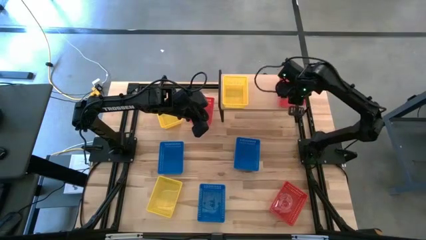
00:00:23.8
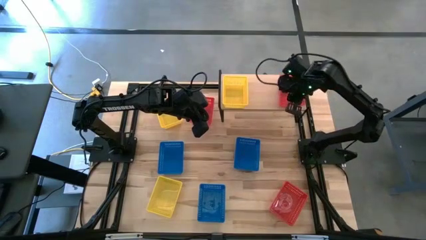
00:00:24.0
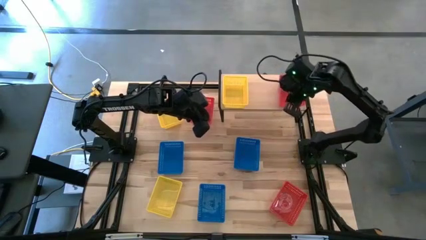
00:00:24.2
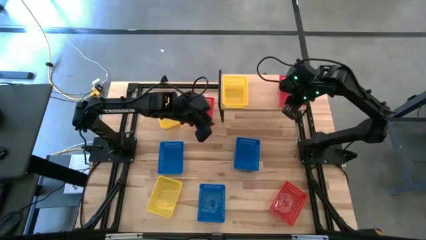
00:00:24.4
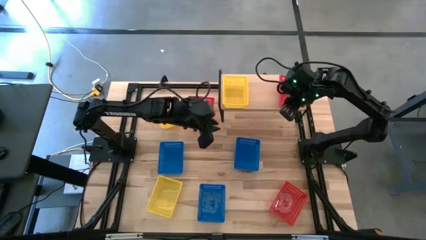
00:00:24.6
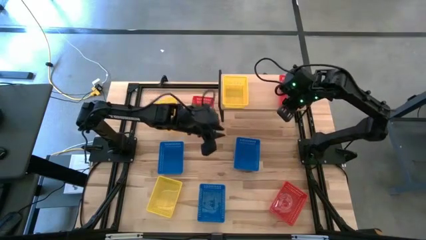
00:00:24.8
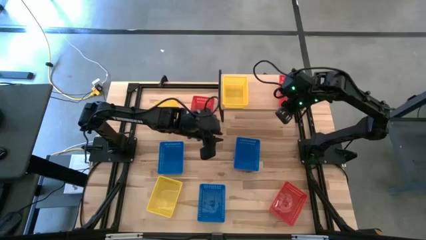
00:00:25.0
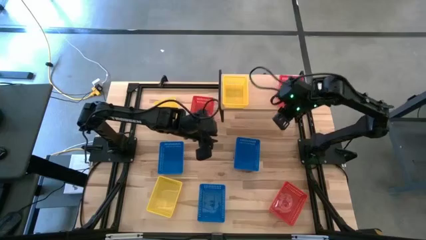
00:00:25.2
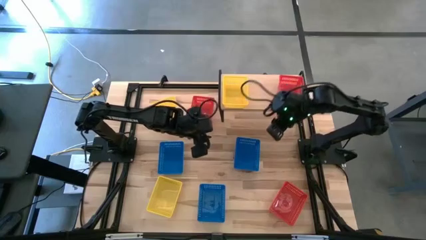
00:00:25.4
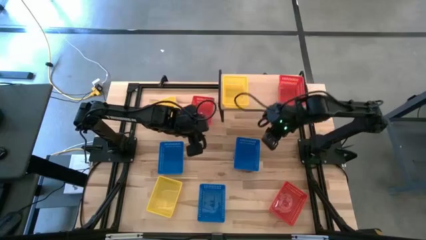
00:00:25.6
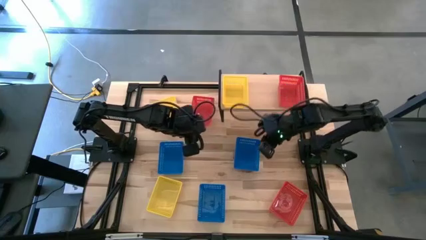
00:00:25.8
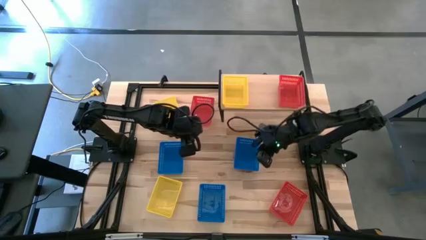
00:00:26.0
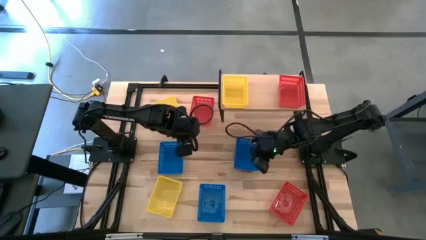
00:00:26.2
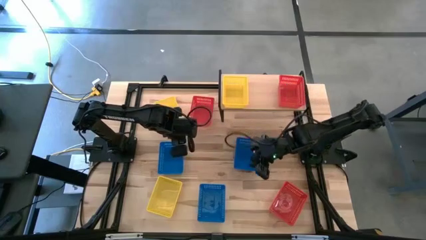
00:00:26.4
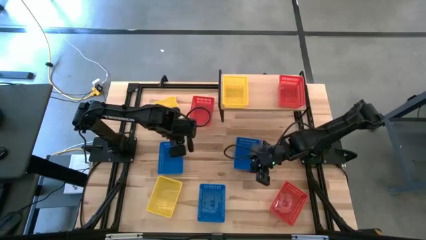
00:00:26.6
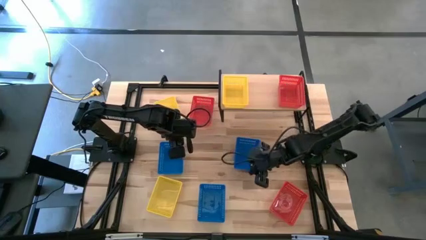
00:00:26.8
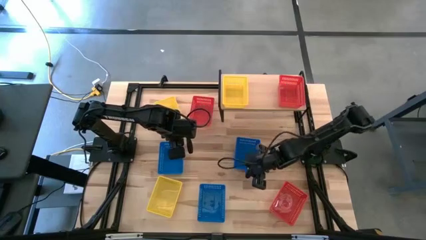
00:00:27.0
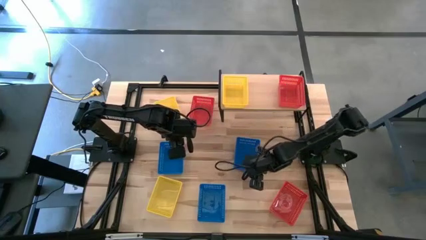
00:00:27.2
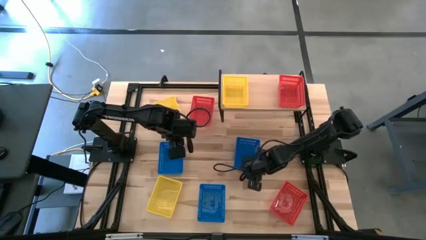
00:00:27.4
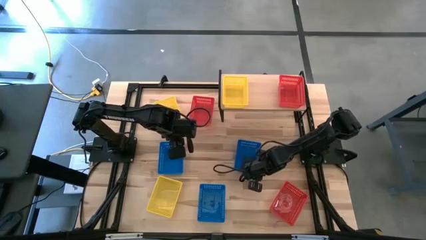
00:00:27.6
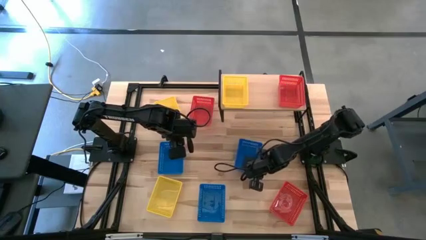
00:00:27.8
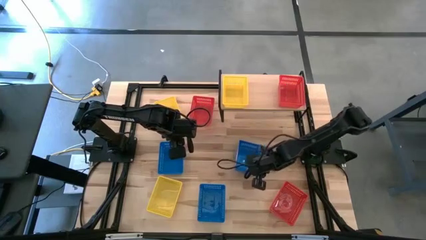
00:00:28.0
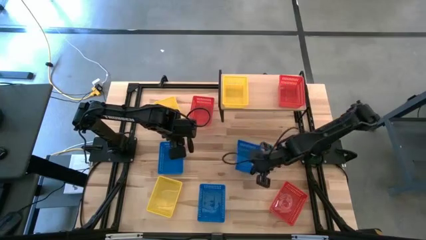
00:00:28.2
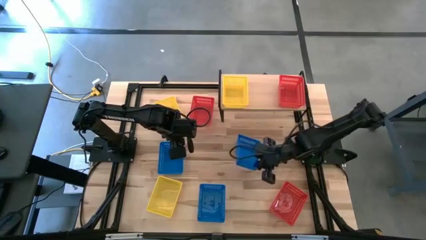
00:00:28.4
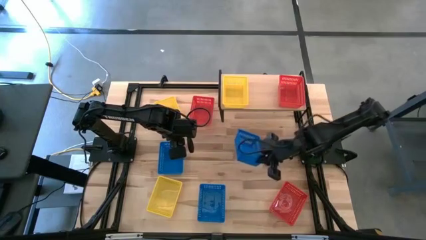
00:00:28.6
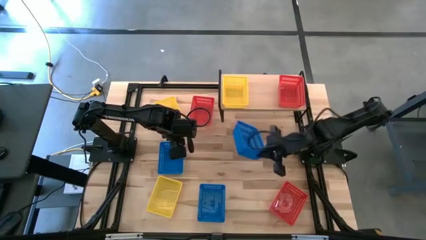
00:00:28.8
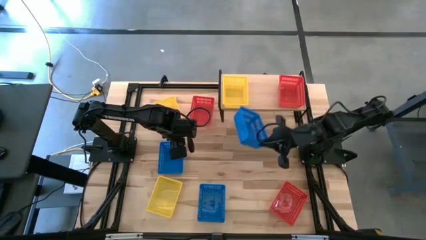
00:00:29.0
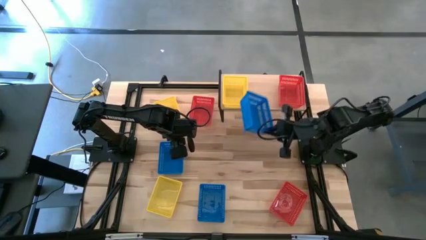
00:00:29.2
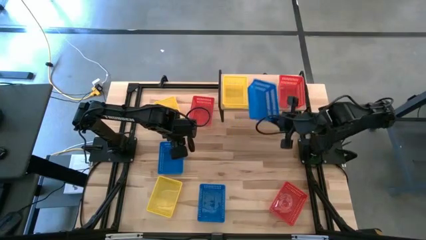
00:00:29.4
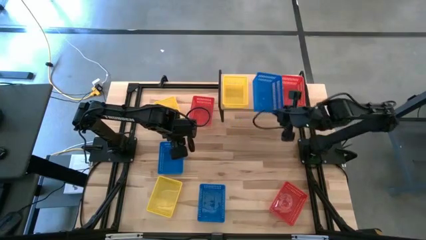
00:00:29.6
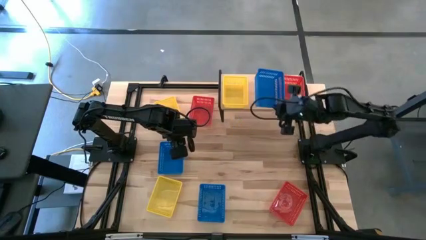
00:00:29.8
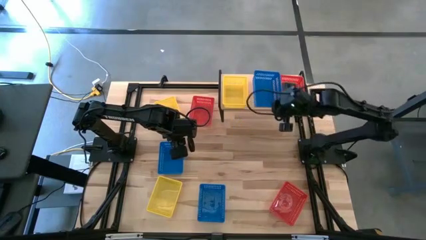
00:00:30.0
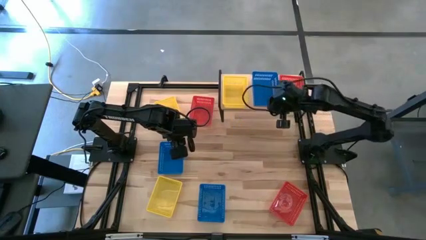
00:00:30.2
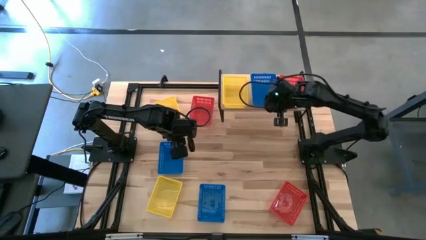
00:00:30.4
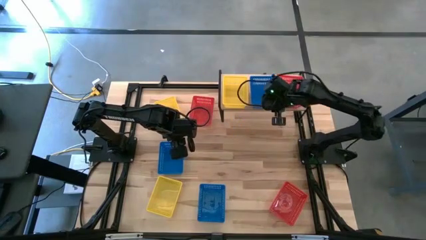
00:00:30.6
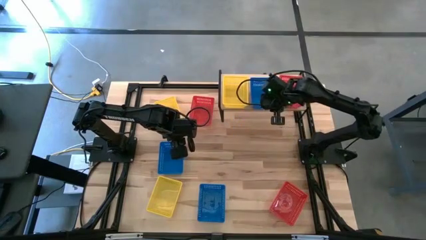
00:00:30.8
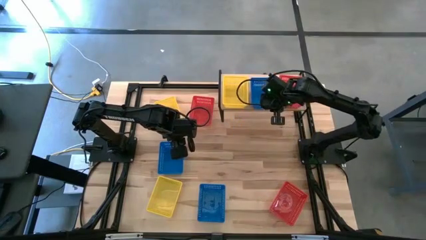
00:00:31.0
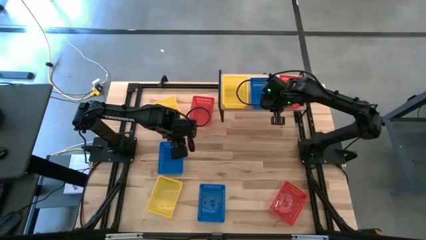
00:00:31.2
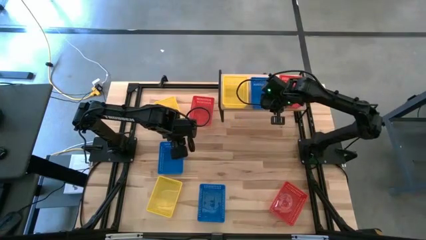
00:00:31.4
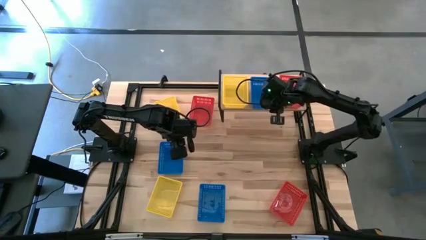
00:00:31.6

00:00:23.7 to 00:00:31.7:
Task: Stack baskets on shelf by color
Put the right blue bin on the shelf

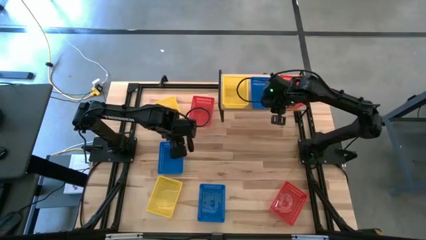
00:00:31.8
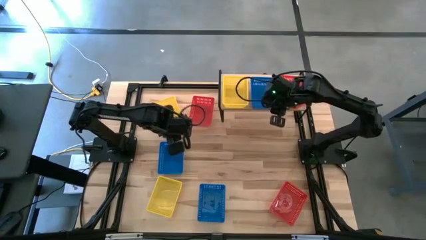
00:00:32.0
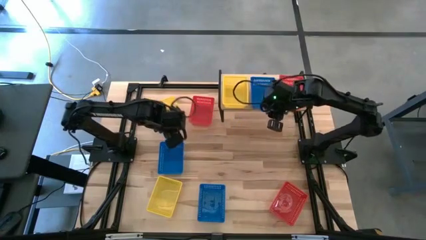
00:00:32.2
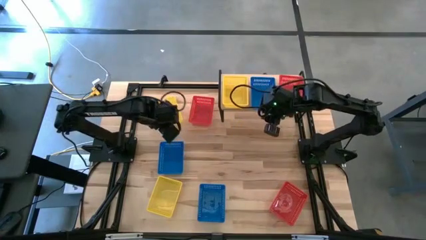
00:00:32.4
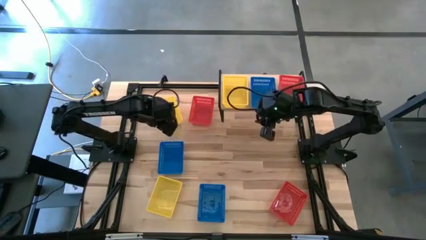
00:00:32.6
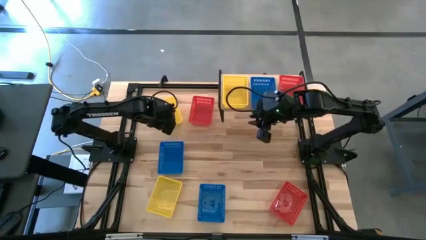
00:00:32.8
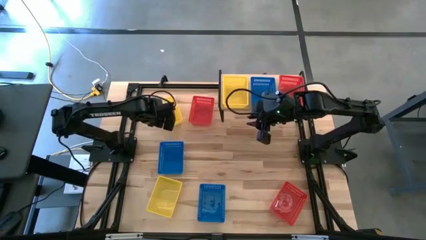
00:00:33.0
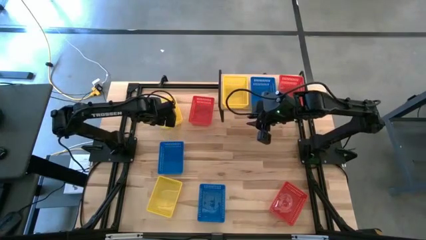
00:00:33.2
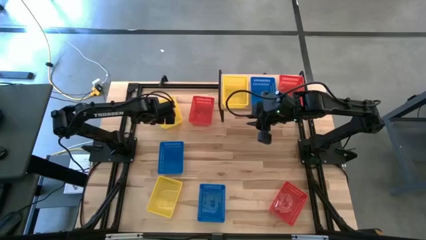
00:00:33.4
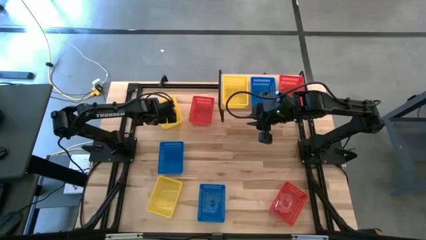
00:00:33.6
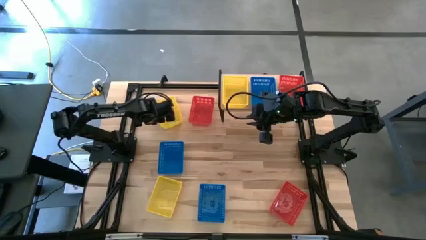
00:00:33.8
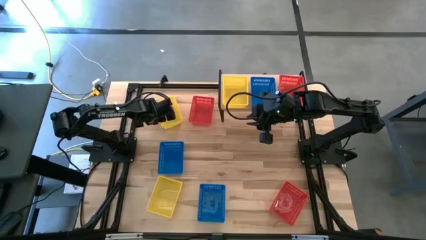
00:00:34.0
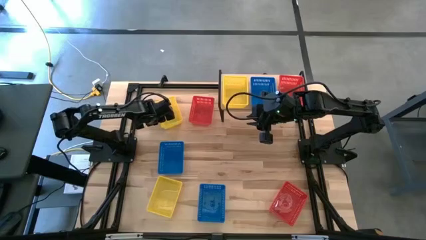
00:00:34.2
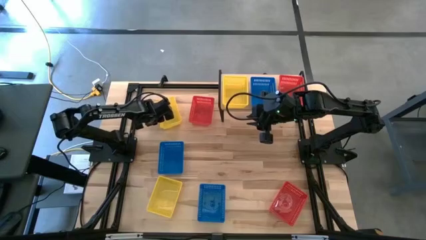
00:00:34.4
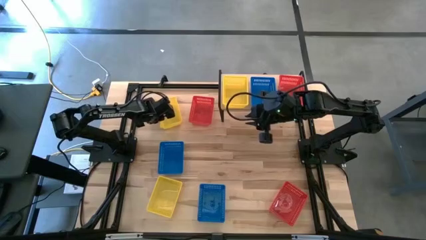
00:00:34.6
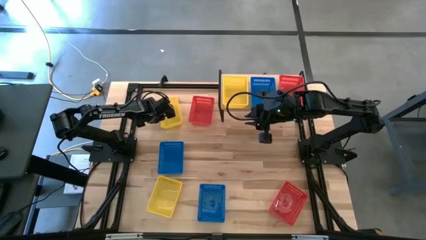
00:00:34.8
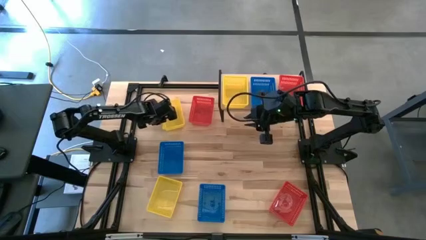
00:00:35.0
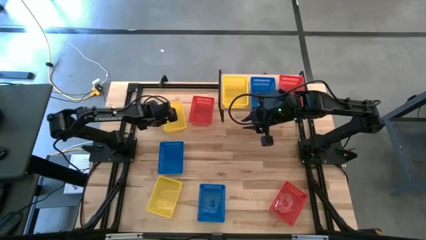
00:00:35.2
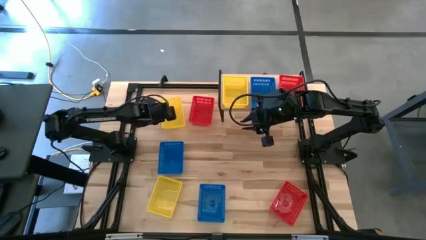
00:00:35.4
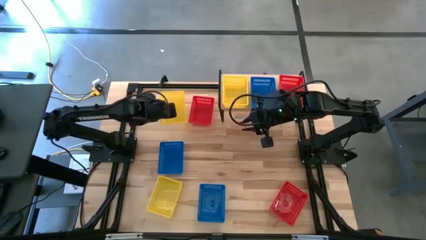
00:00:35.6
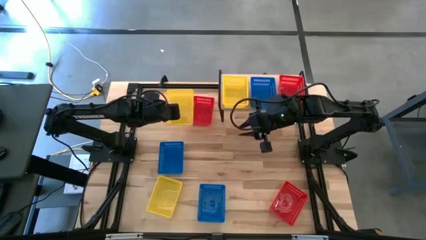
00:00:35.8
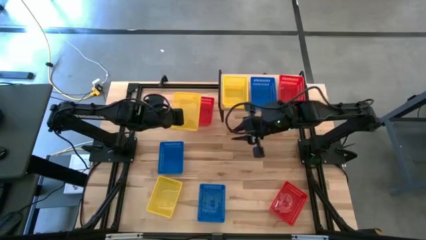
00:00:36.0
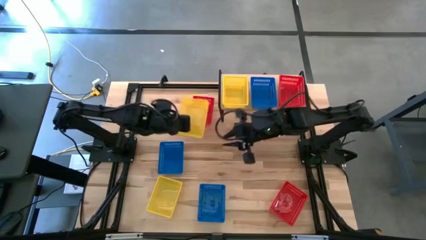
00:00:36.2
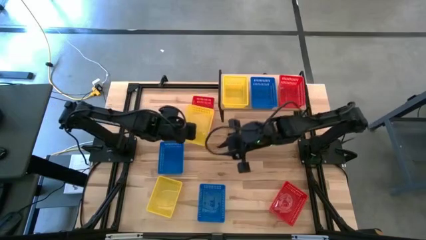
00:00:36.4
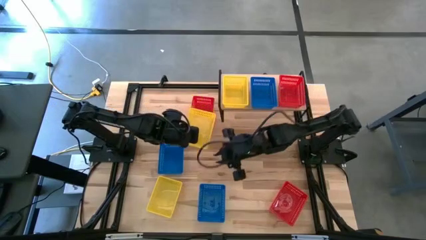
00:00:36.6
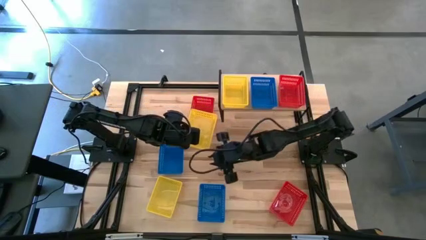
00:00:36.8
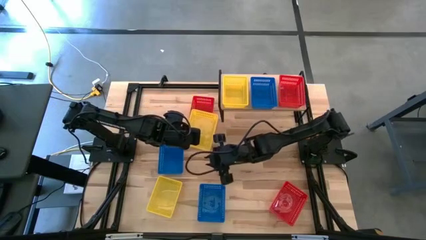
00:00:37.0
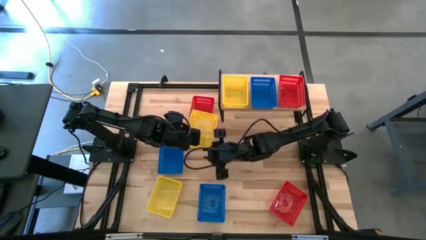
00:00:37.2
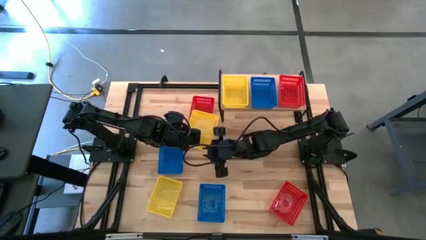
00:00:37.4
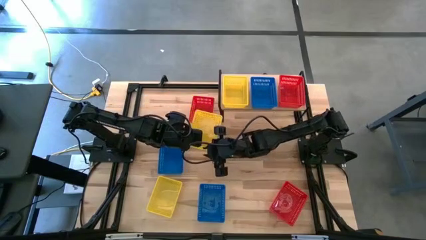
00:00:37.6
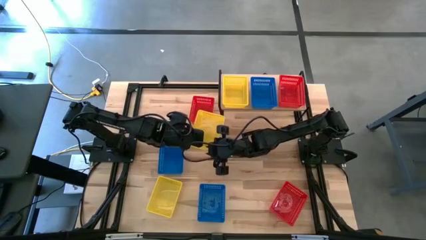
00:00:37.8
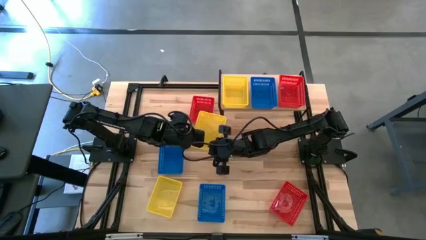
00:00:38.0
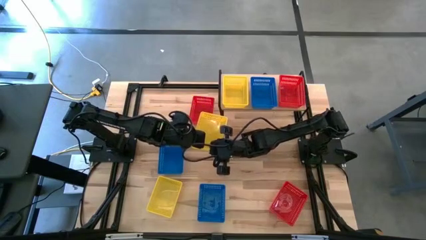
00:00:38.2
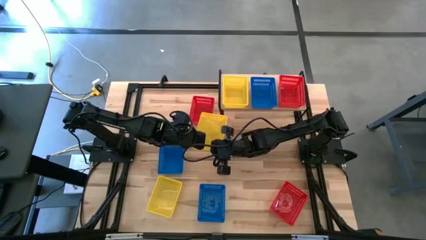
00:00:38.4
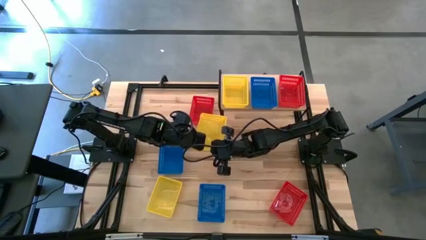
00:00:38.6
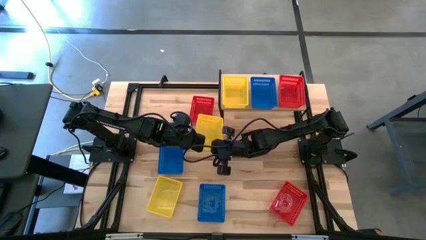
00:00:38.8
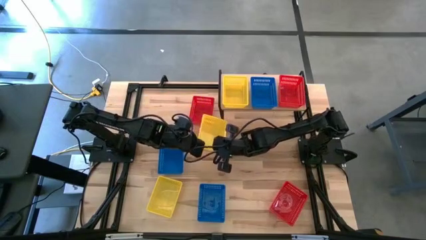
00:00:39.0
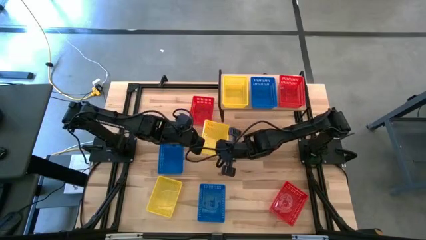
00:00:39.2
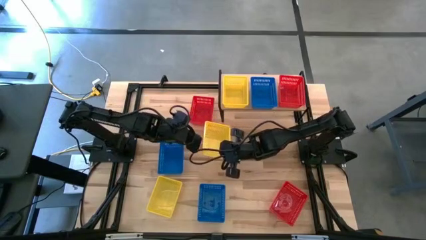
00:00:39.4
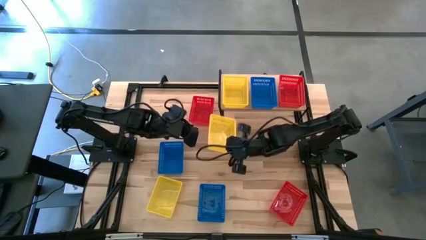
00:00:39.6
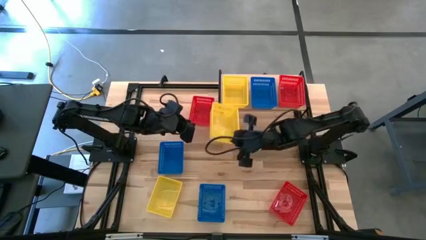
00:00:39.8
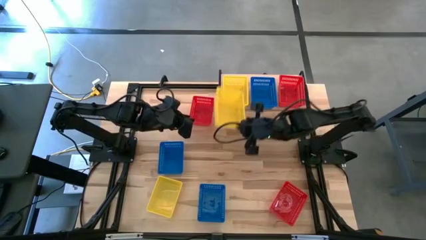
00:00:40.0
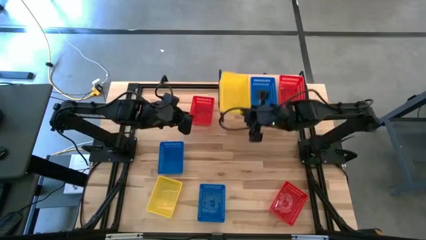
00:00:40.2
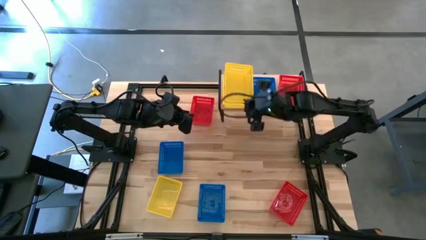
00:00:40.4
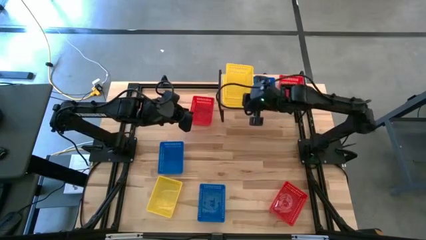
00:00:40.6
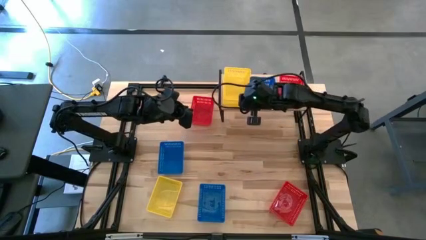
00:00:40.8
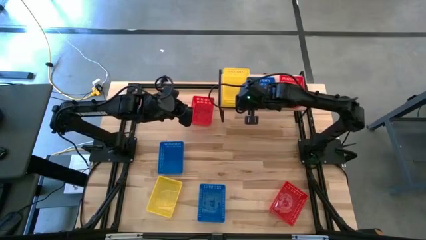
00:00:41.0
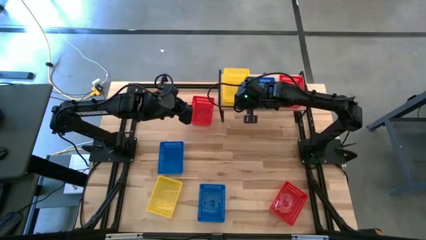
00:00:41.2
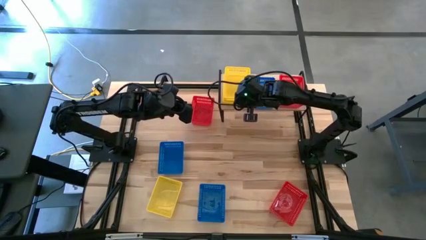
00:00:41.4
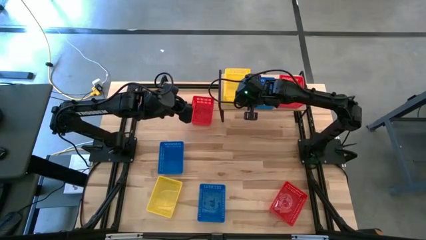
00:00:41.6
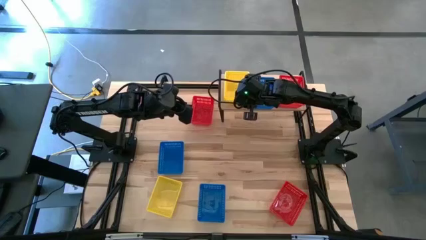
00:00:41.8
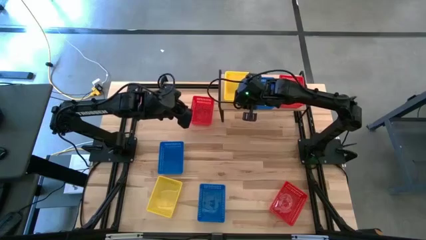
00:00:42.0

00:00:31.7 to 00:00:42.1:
Stack the top yellow bin on top of the other yellow bin on the shelf
